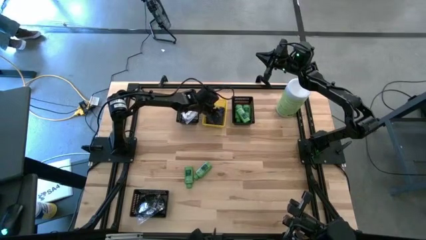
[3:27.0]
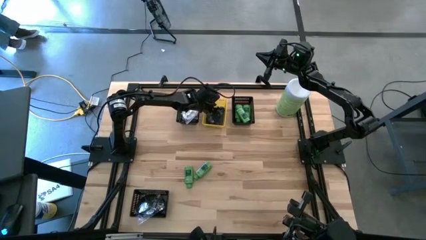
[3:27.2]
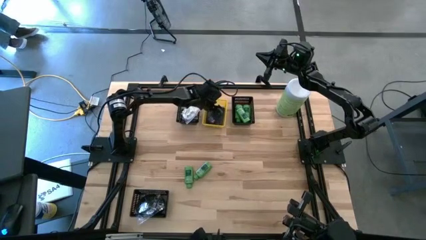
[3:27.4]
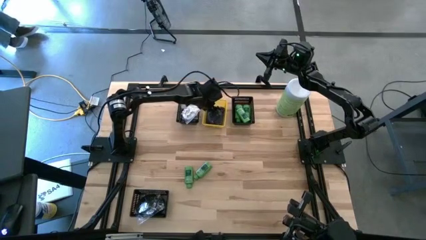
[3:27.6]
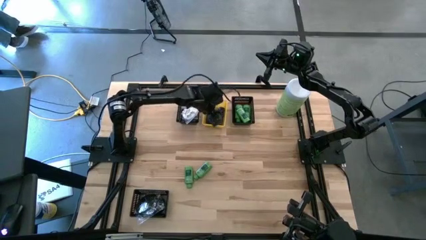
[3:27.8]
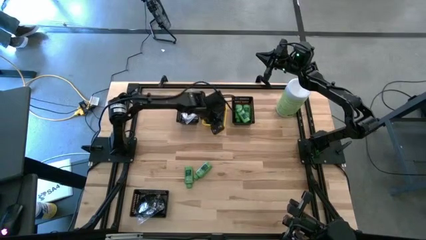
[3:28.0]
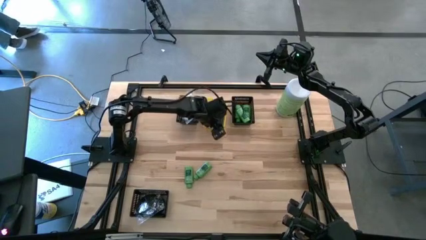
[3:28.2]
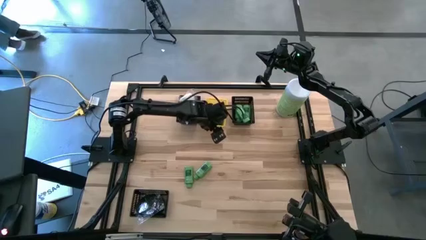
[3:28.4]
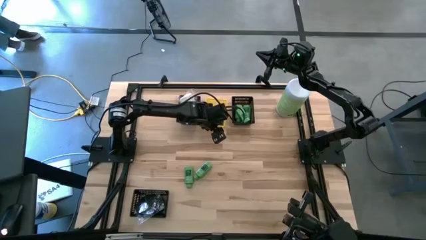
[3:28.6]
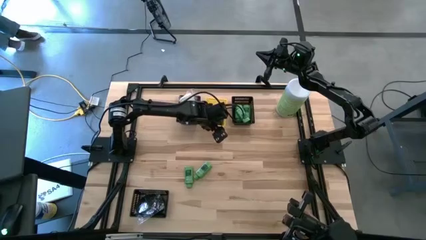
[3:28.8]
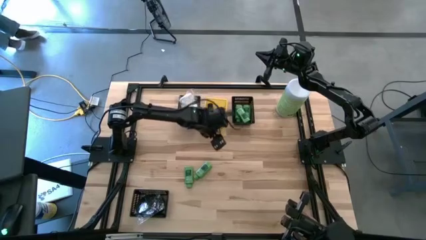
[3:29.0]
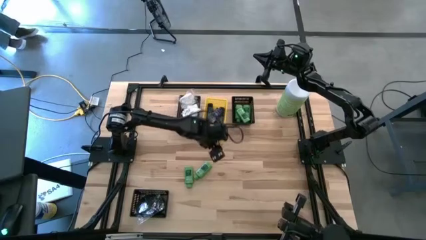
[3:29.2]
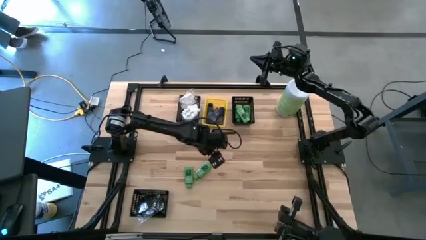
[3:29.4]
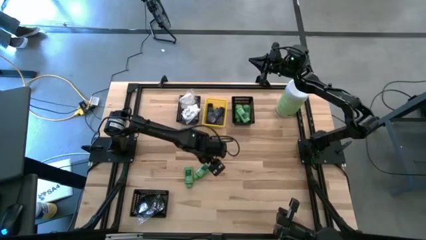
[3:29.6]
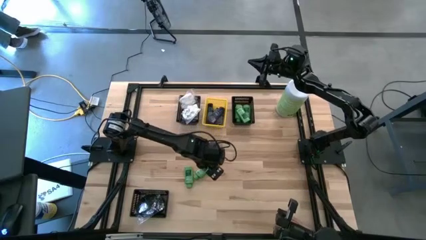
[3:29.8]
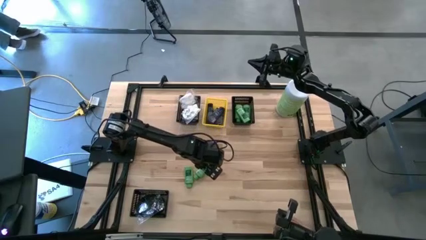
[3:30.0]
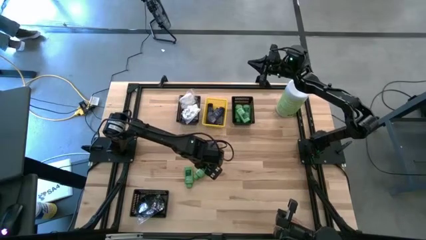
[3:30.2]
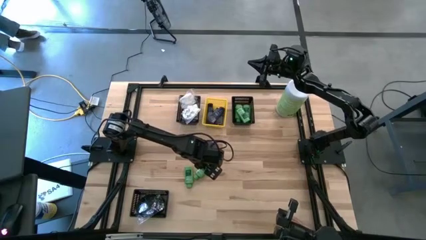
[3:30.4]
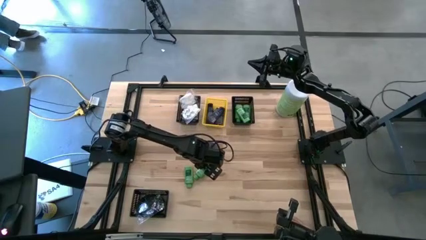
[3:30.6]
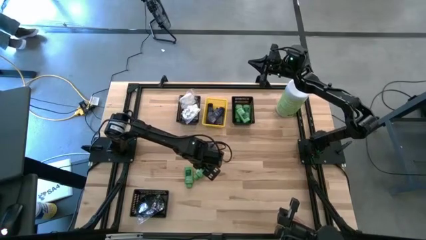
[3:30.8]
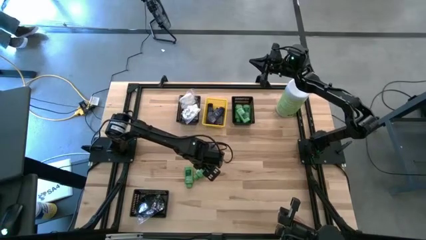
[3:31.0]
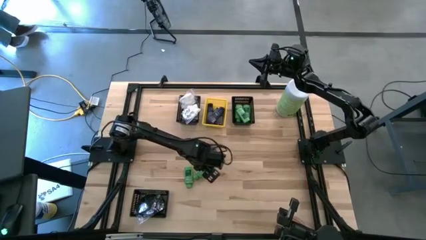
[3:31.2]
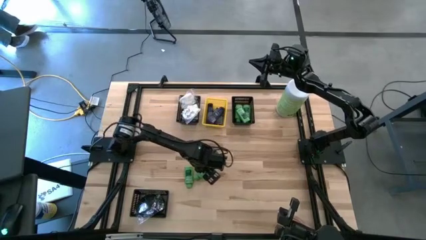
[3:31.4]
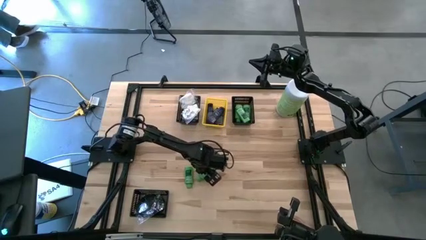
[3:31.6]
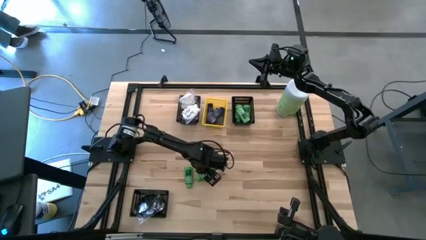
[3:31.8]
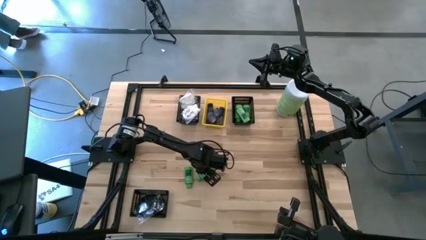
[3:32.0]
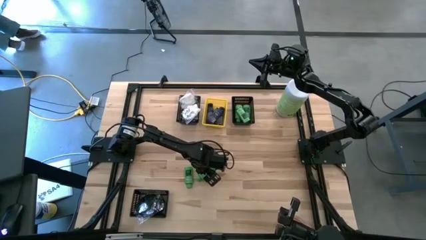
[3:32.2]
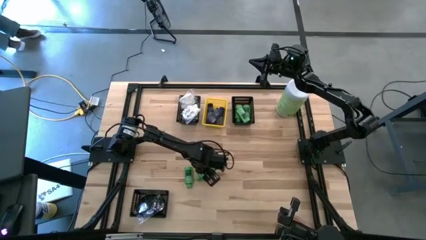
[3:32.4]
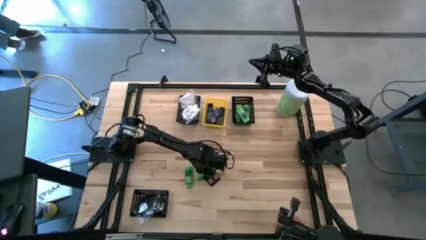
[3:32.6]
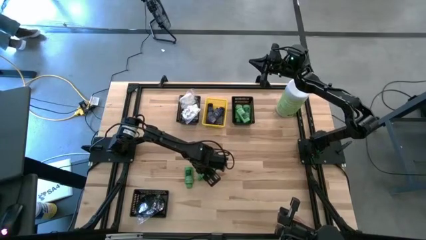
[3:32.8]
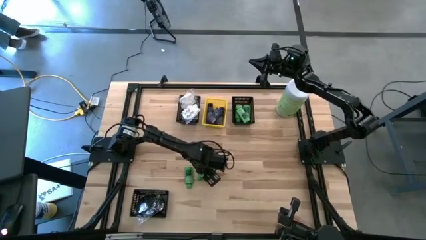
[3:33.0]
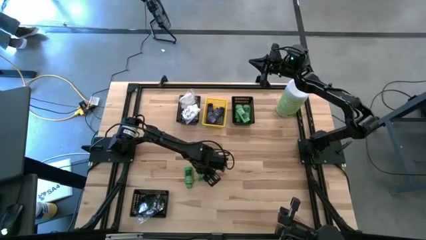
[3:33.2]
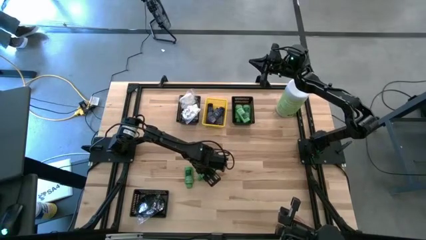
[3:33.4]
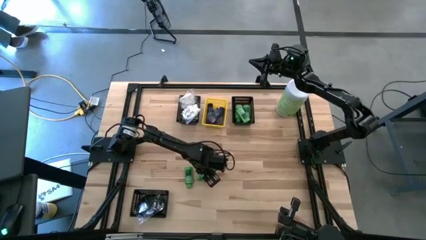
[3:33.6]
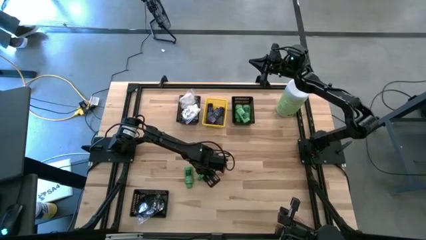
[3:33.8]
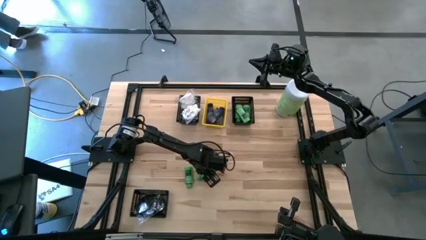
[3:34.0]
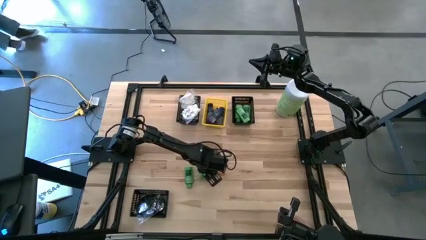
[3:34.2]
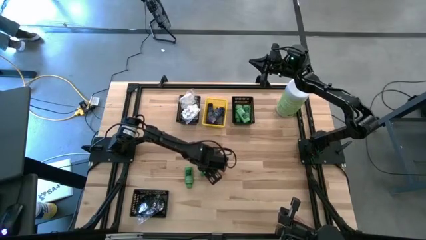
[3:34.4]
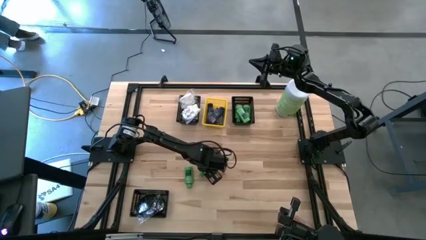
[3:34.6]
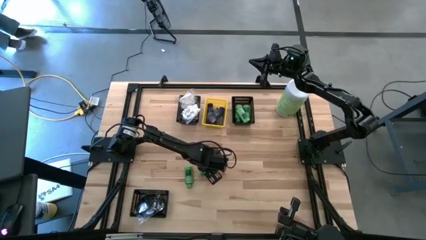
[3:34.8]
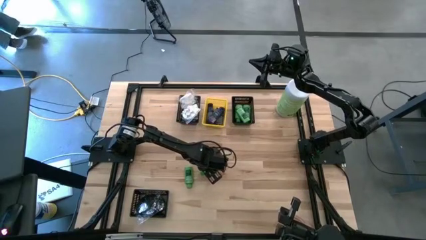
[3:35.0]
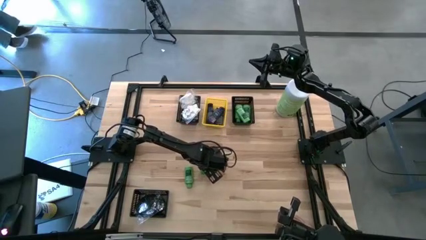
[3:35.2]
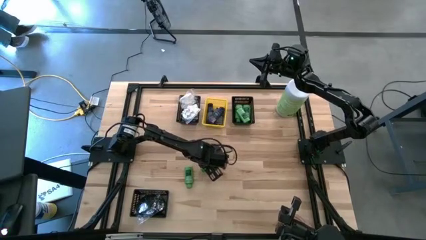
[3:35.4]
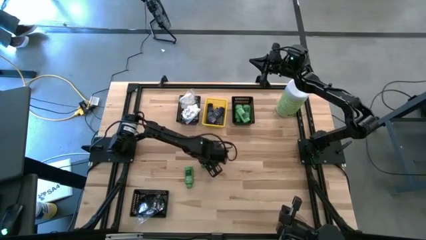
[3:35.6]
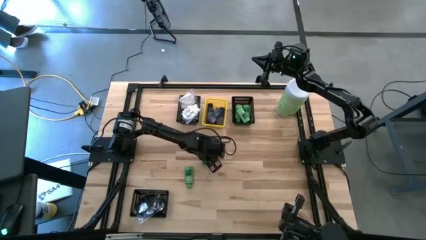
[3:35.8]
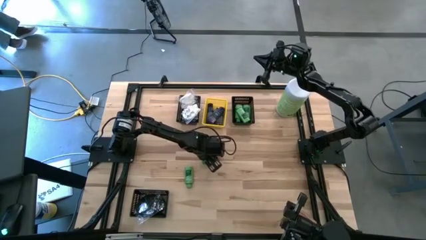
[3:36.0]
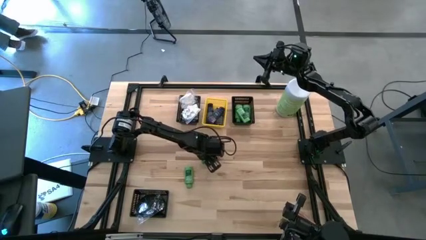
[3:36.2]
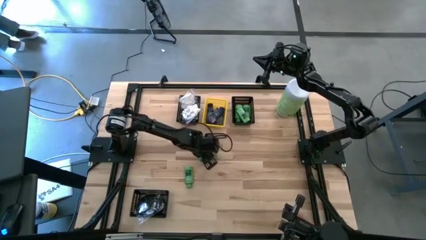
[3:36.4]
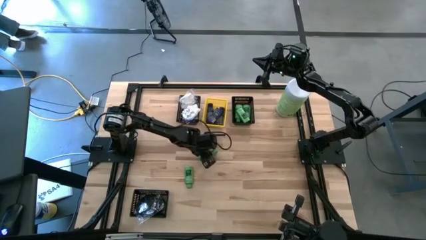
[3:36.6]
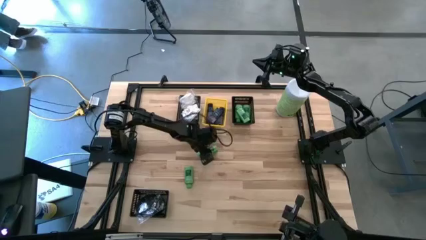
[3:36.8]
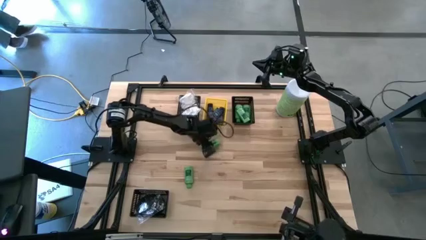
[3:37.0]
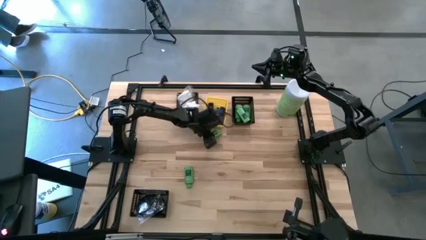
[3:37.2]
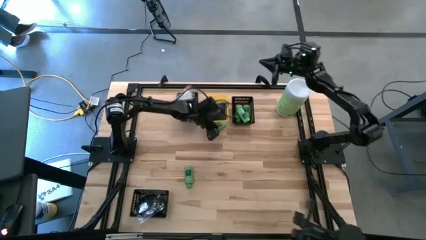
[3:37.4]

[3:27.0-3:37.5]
Task: Pick & Place Travel size toiletries
Put the green shampoo bottle into the top right black bin

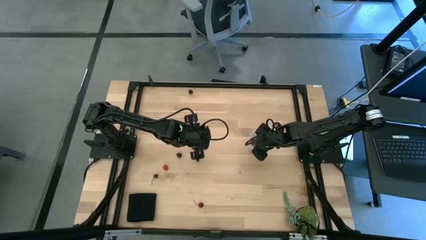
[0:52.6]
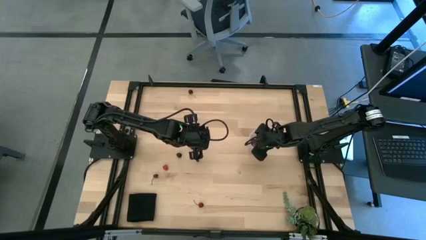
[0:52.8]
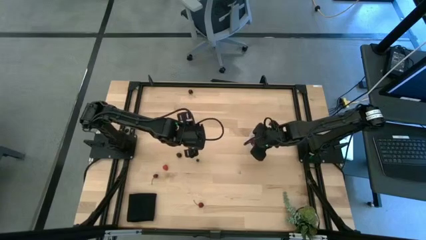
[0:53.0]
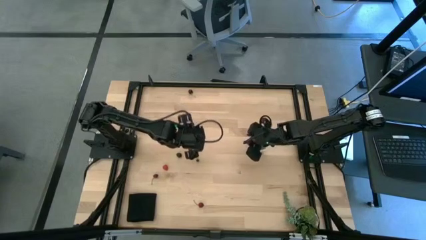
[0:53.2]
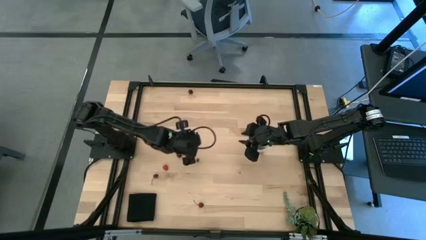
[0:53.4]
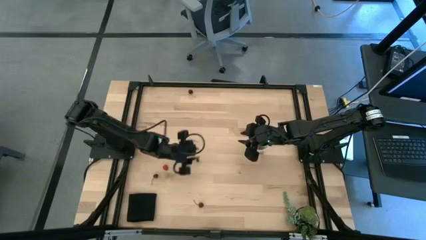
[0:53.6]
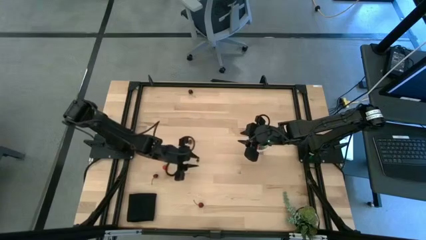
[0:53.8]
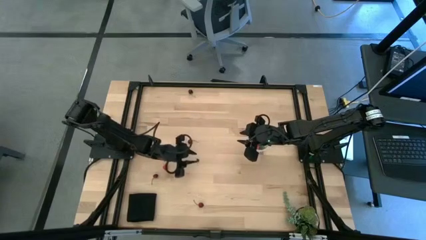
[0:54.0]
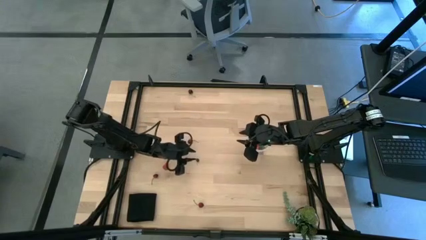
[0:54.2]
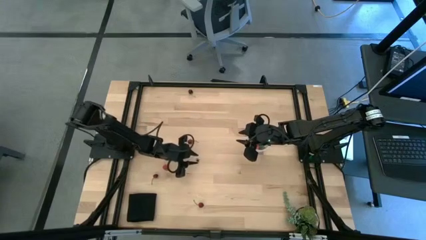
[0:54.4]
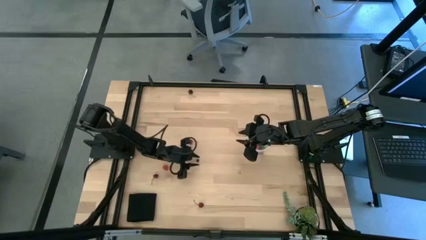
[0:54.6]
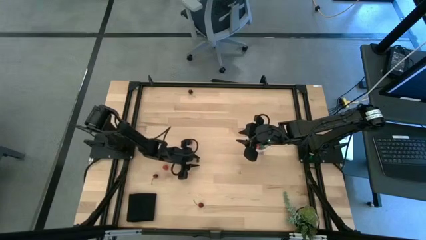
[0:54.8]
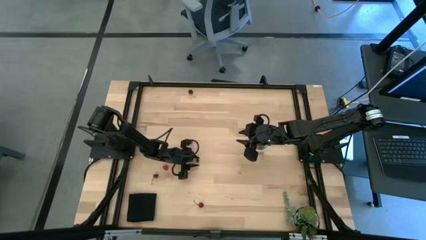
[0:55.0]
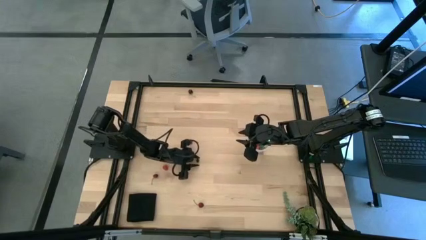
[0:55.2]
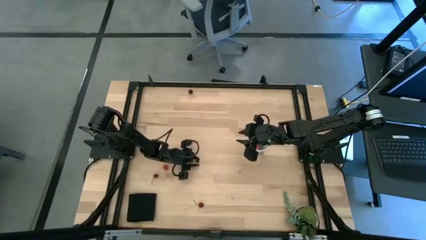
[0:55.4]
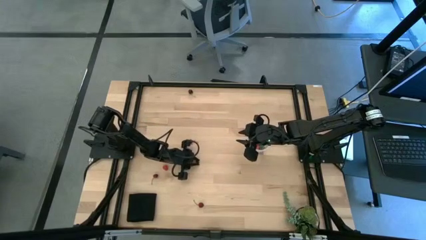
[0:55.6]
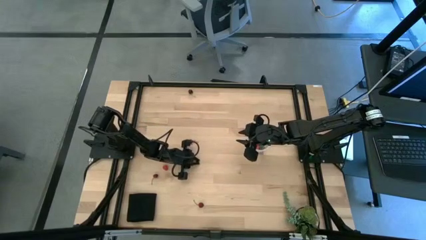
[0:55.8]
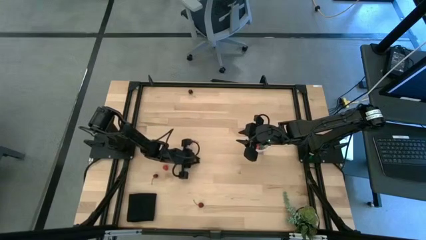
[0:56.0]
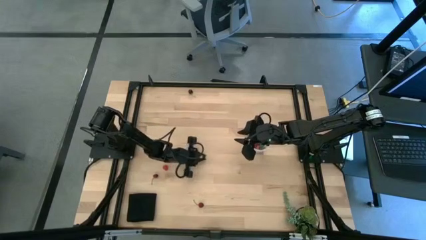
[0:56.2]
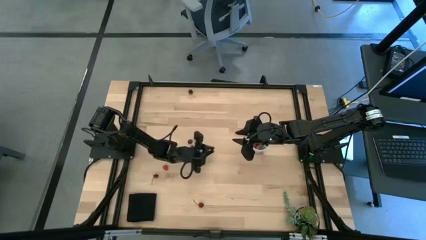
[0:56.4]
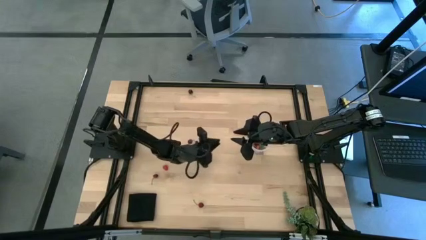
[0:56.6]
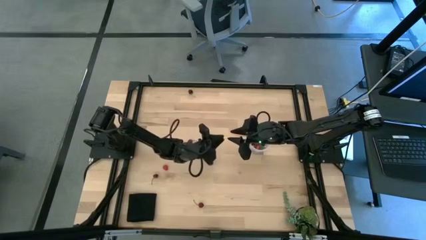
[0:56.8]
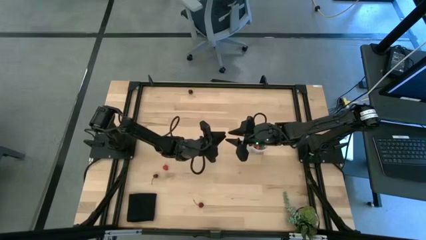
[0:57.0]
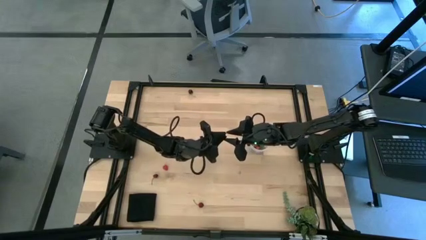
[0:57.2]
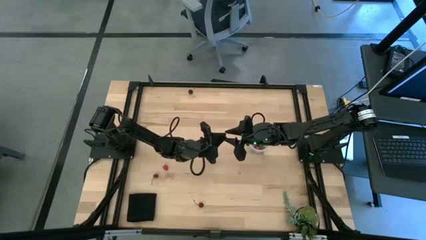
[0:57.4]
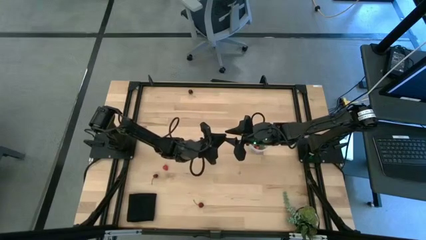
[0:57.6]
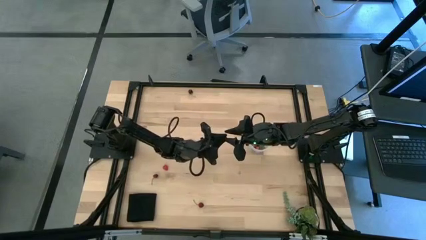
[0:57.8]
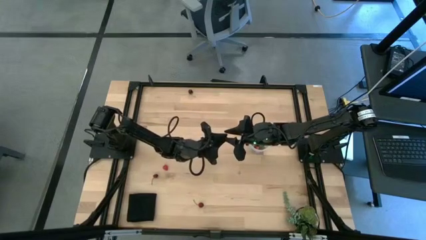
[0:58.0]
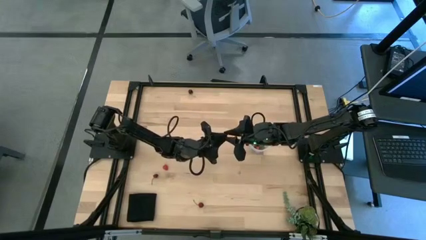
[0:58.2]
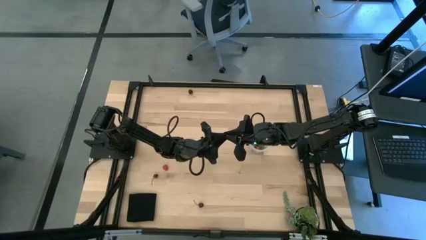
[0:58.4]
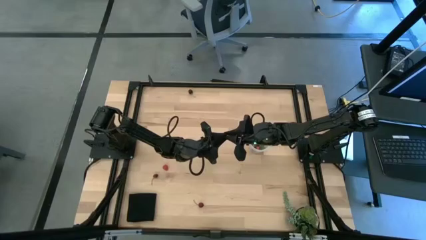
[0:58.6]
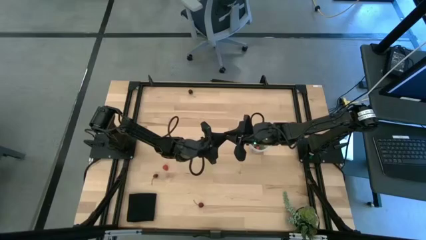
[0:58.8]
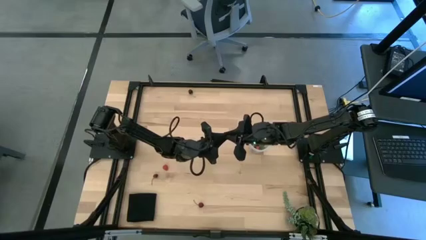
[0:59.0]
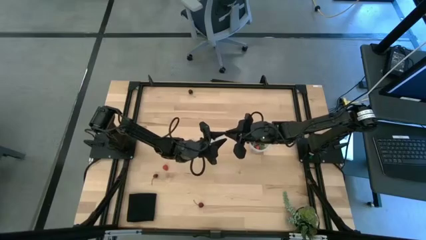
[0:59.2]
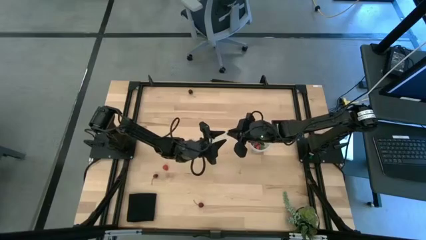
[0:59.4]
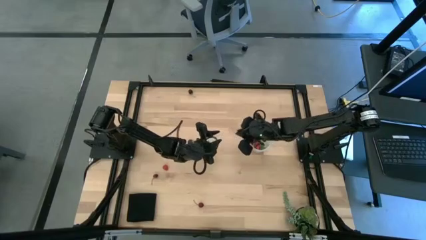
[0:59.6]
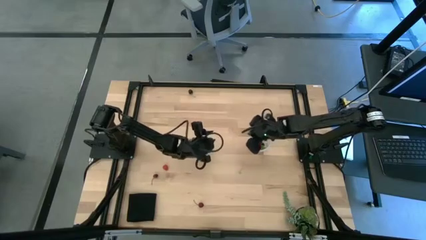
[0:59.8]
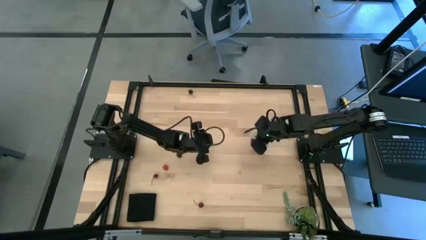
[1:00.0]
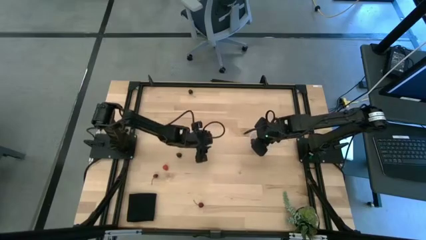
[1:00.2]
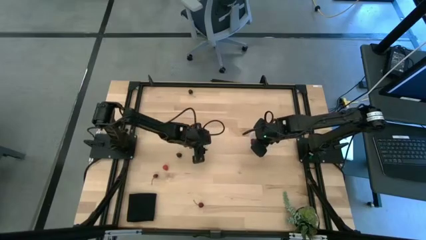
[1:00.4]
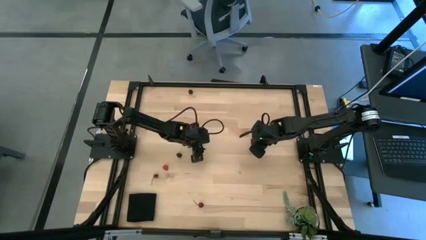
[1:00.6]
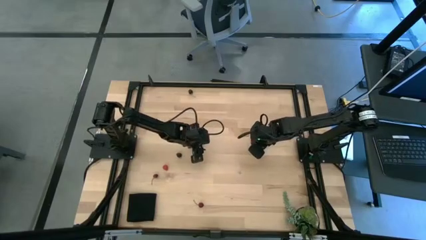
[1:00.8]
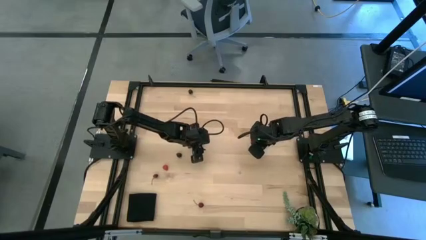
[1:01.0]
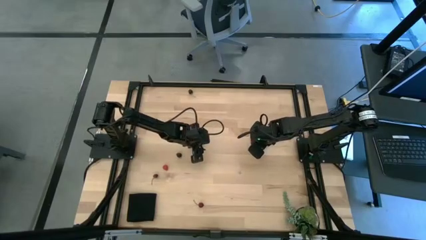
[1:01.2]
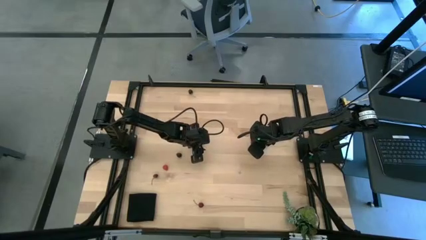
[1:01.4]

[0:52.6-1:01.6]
Task: Pick and placing Produce into tupperware
Put the blueberry into the transparent bucket
